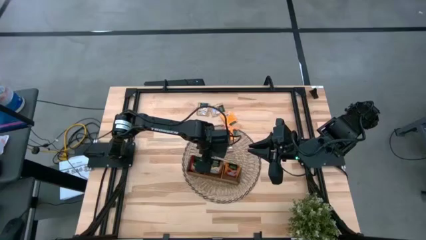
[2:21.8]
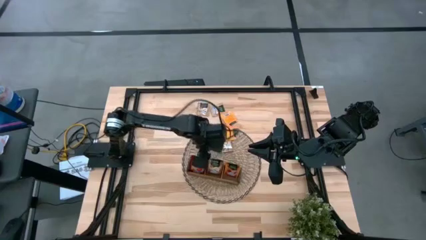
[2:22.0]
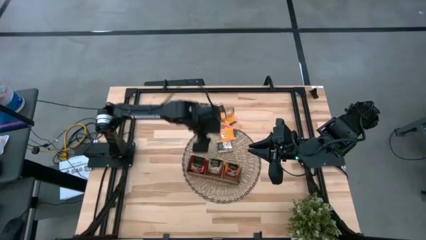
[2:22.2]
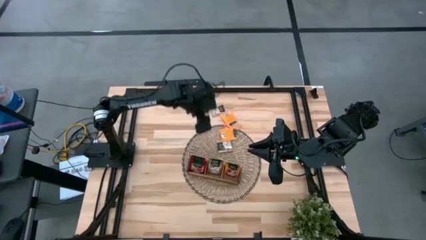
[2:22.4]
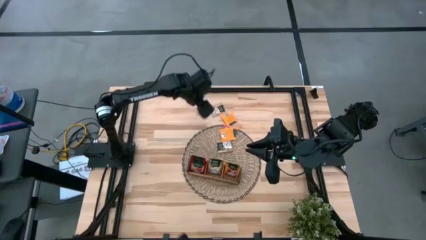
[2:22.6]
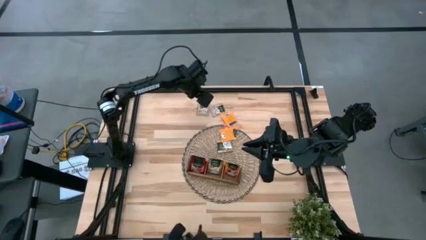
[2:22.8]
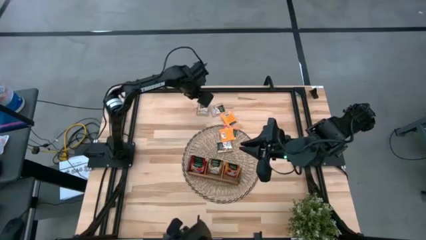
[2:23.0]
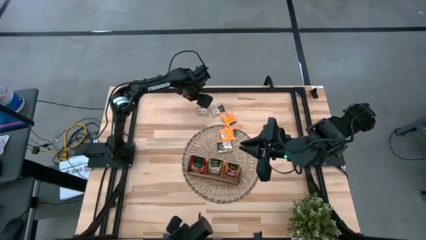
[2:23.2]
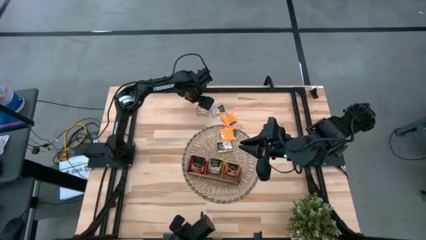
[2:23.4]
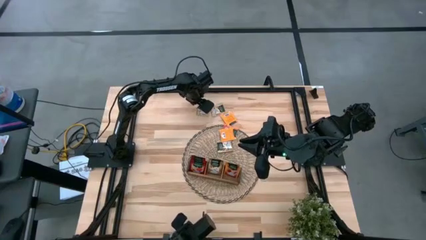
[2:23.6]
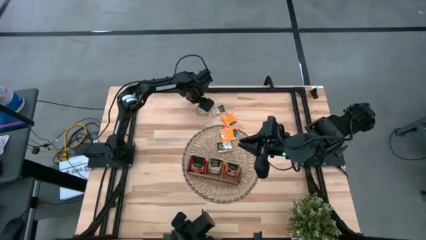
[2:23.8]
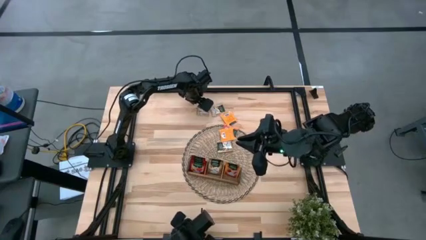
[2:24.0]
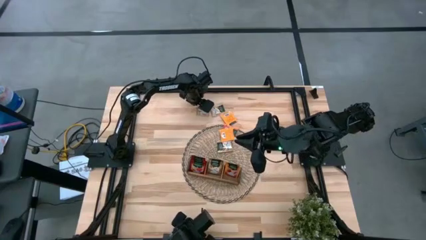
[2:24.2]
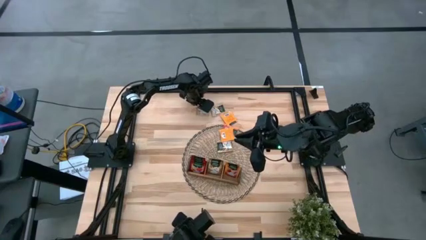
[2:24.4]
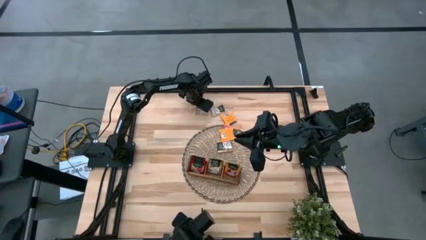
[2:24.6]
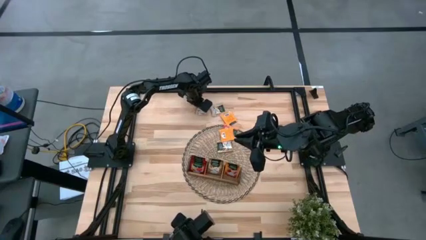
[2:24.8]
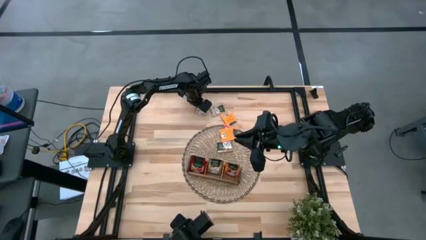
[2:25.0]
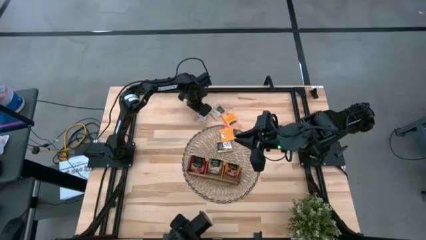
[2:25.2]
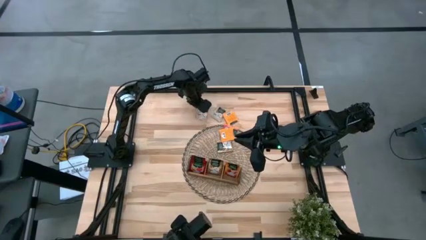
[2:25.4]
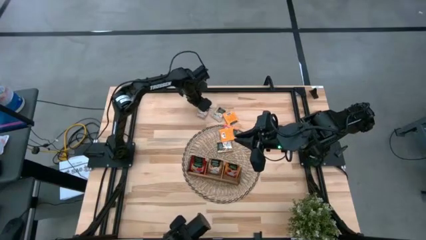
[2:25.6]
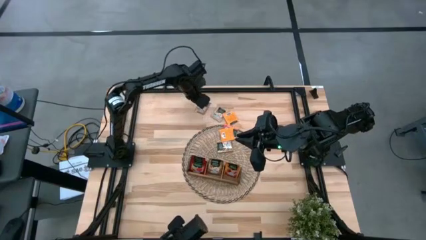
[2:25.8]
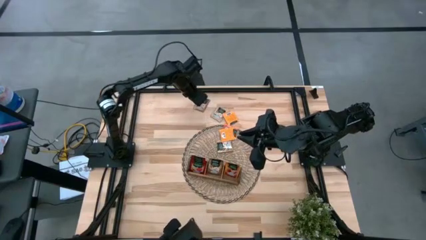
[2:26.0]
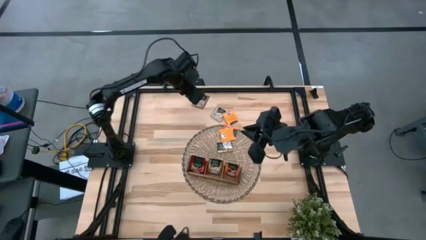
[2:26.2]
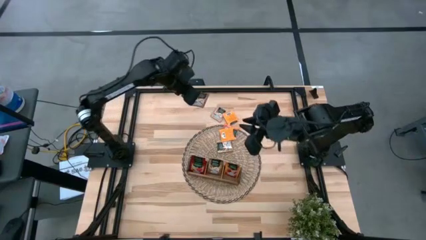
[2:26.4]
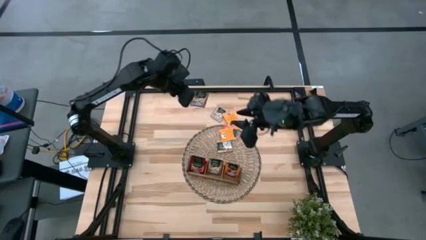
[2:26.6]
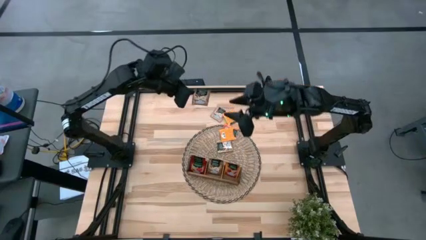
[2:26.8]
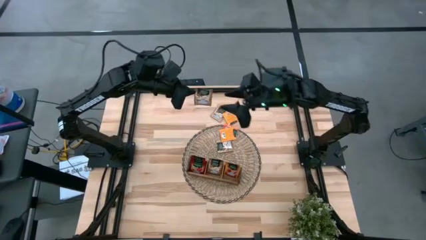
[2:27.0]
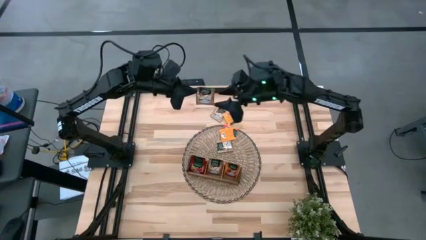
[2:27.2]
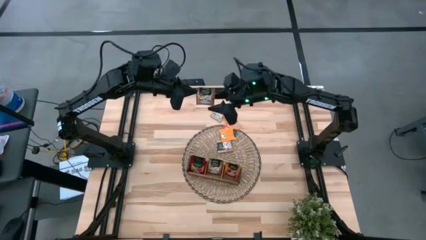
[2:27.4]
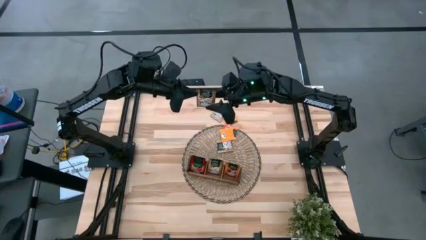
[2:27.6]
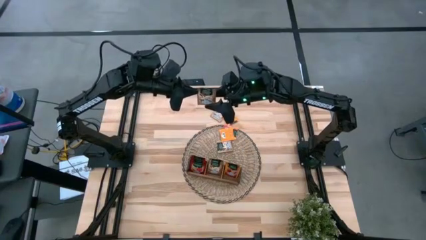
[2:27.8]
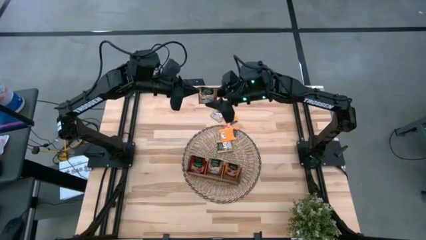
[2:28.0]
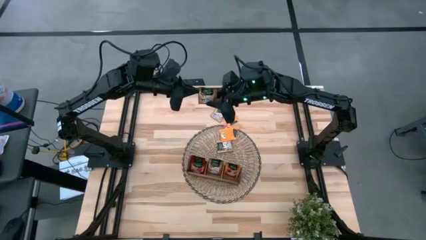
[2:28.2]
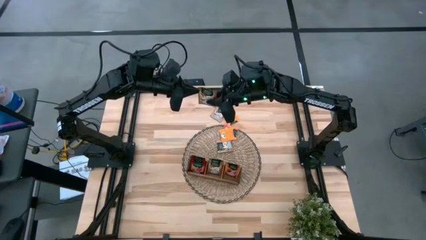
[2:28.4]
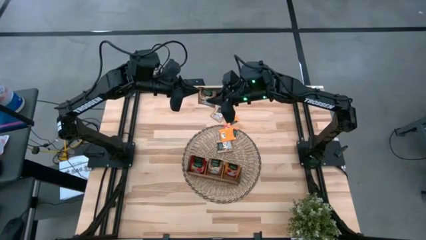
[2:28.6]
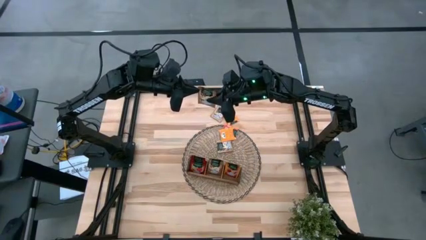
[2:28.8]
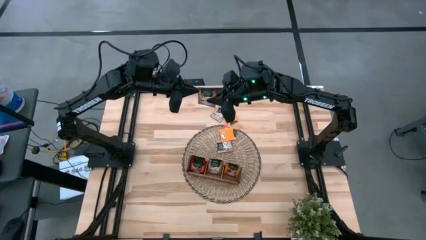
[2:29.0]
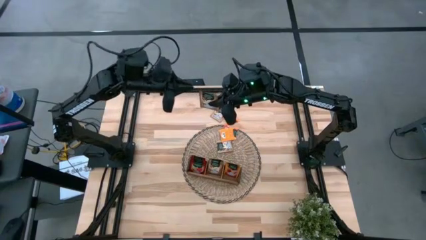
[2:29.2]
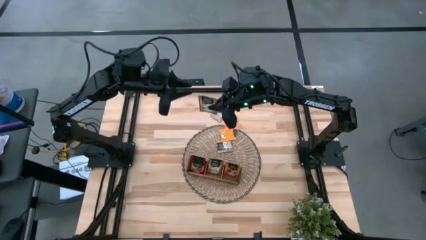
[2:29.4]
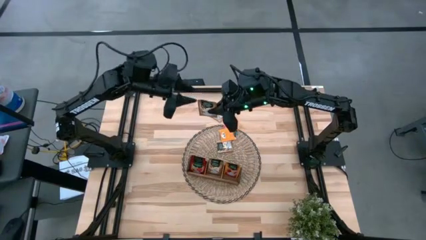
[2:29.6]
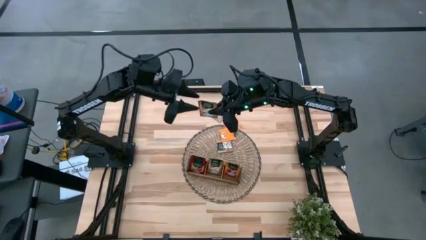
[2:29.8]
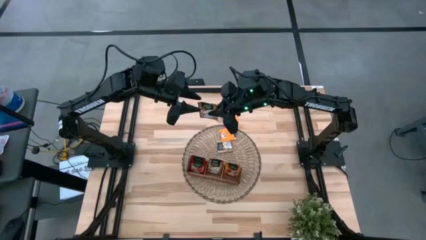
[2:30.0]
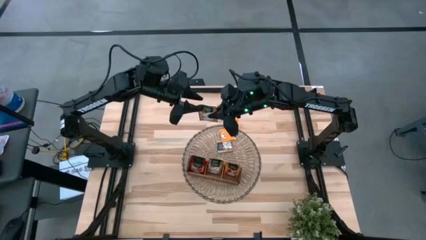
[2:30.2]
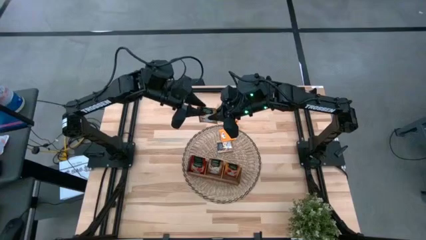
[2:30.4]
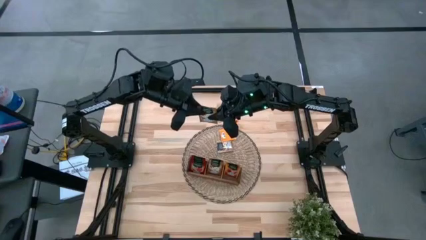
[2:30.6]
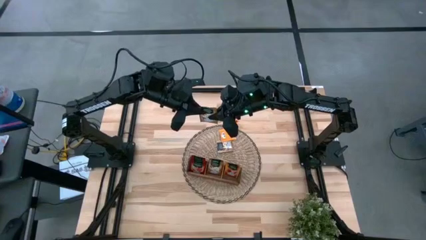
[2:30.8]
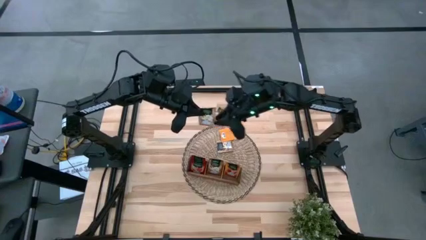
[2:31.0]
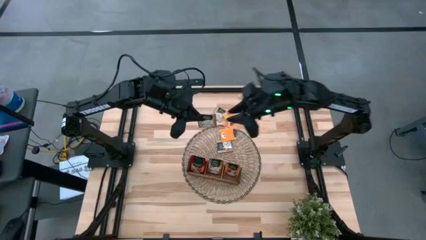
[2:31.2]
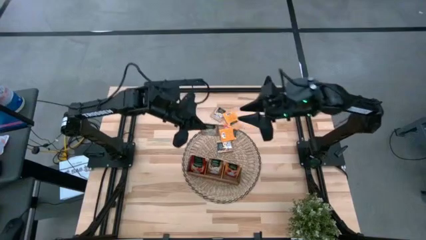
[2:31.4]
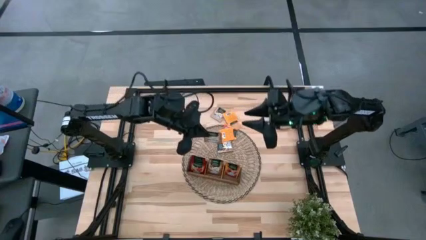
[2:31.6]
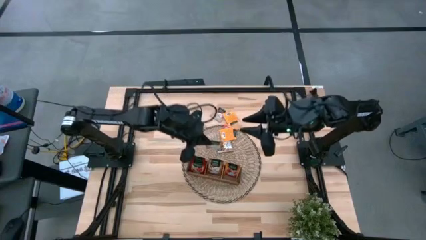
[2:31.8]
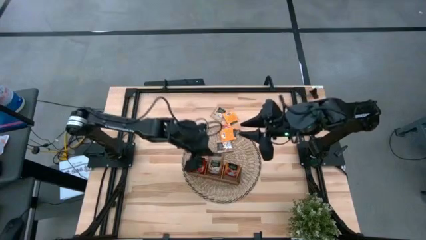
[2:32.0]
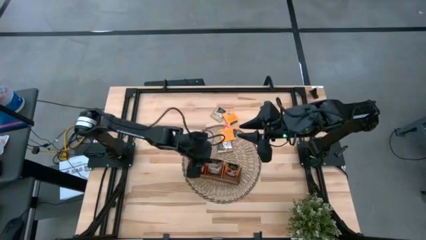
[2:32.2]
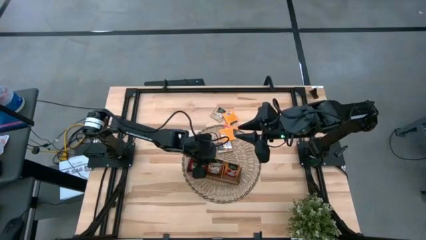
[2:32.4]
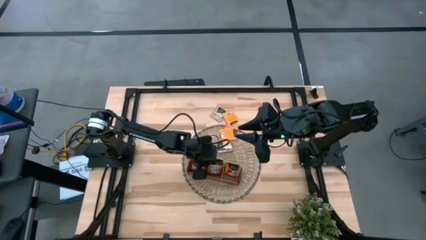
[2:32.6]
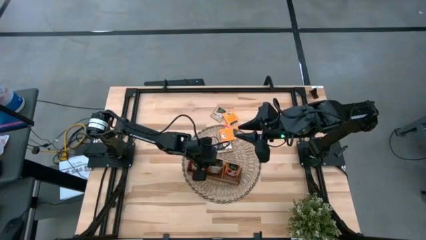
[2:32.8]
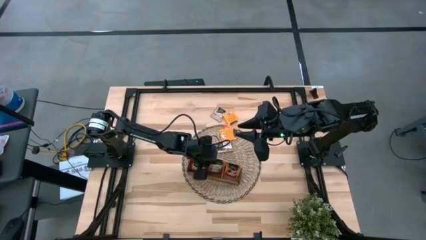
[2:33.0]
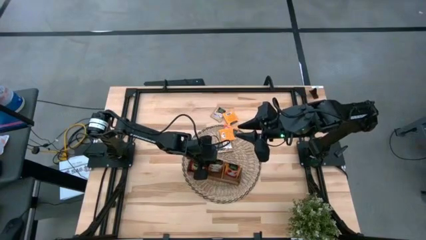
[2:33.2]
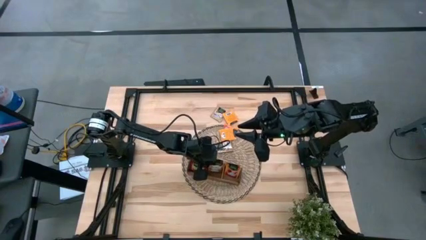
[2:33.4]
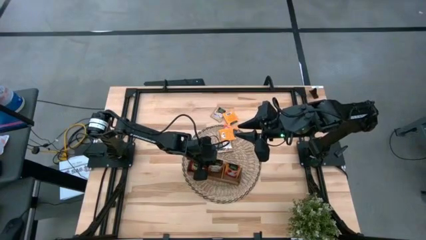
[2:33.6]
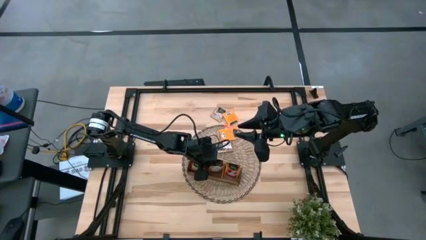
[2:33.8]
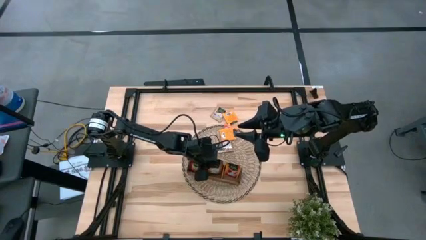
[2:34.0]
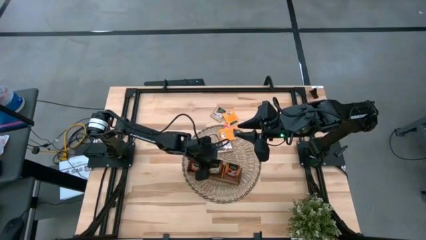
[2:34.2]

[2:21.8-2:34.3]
Task: Pick & Place Tea
Put the brown tea bag into the middle section of the wooden organizer

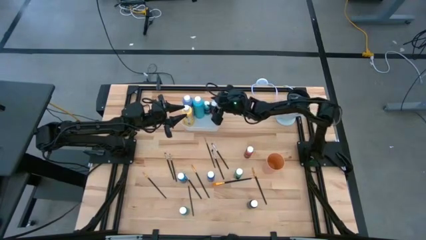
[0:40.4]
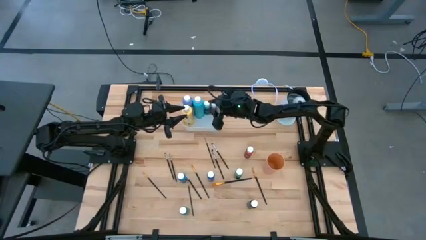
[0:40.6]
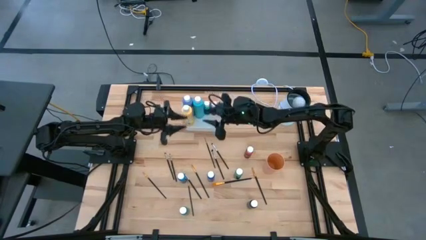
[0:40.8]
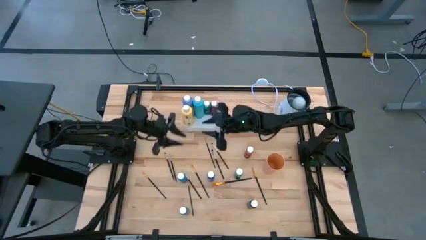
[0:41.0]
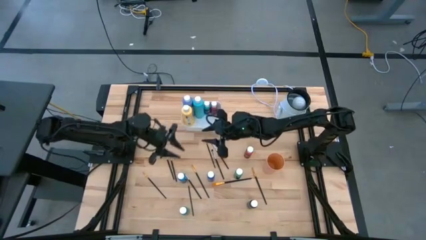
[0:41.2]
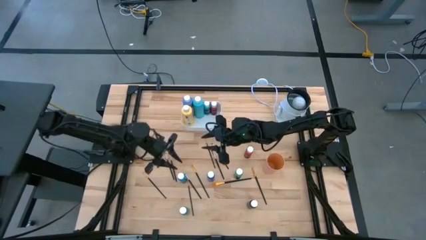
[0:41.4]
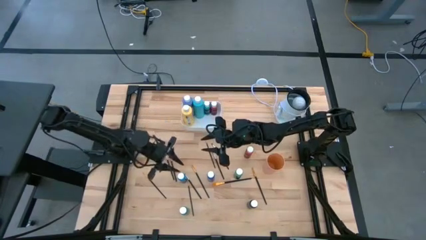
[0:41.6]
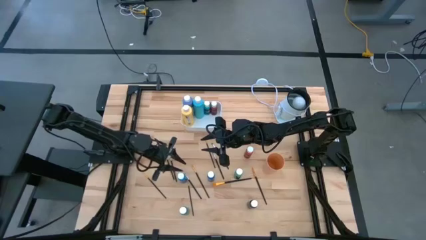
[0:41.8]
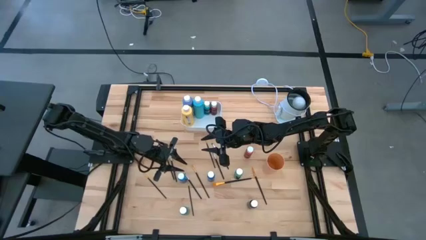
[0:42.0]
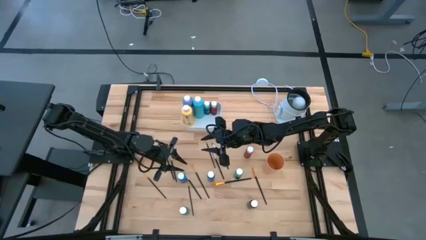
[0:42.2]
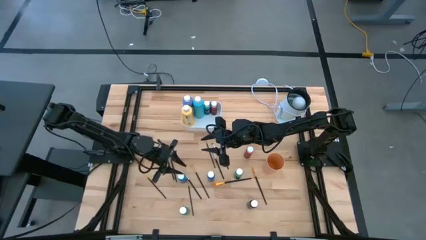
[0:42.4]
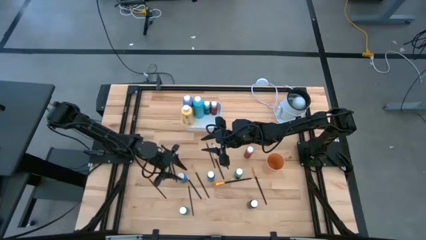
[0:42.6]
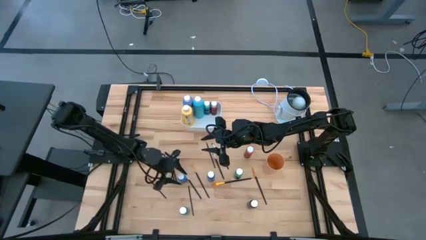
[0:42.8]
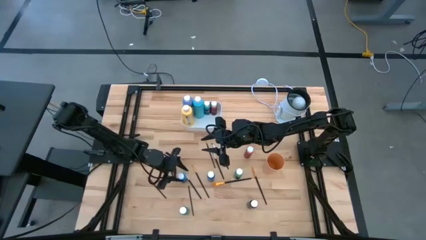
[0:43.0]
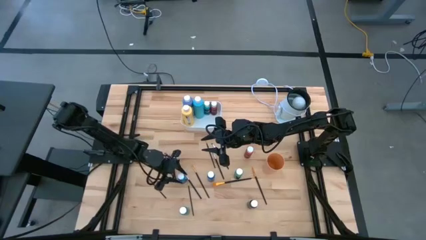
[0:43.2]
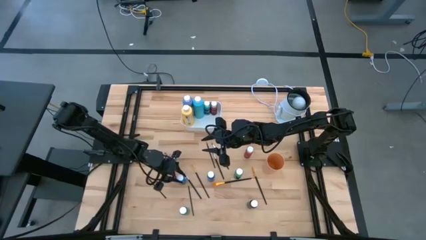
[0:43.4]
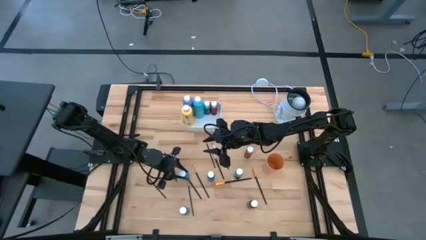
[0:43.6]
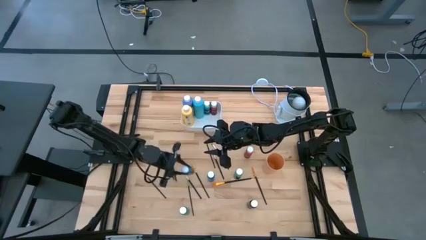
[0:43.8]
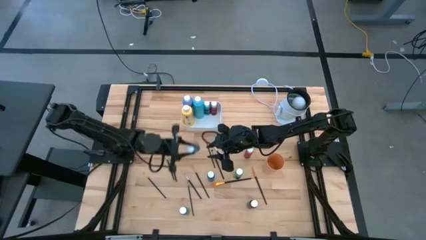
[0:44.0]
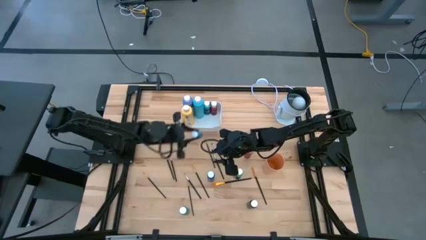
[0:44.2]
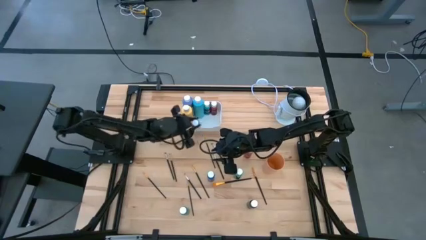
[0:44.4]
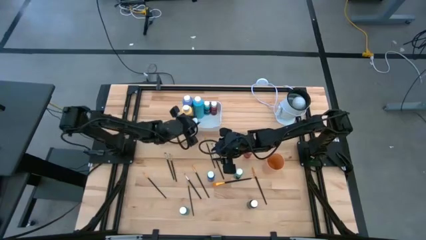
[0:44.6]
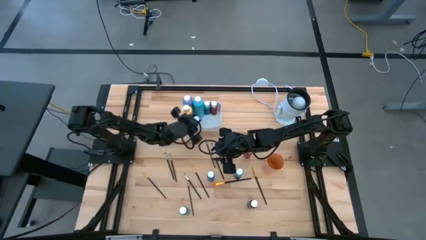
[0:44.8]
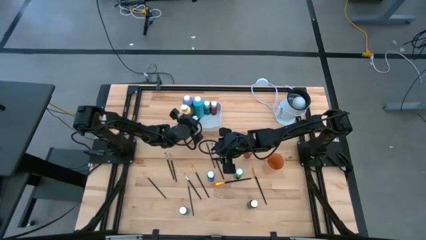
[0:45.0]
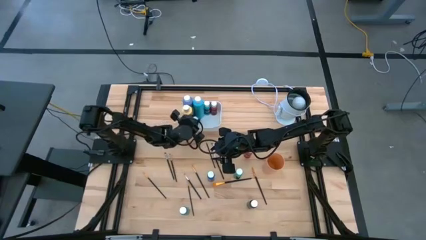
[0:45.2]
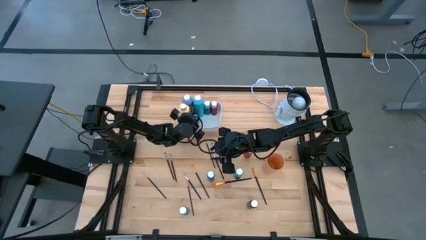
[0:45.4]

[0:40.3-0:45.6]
Task: Pick & Place Paint Supplies
Put the blue paint bottle into the white bin
